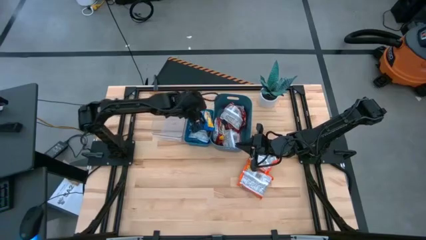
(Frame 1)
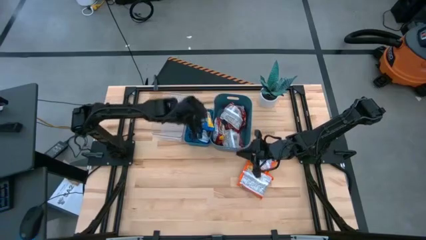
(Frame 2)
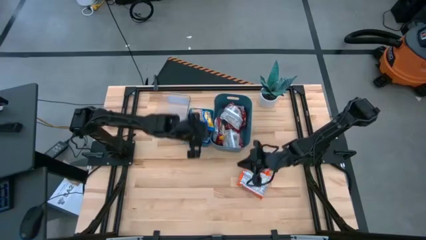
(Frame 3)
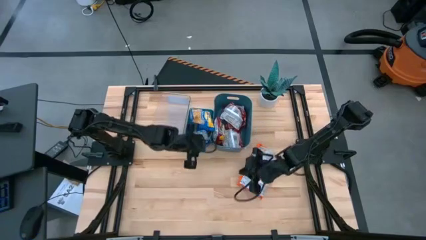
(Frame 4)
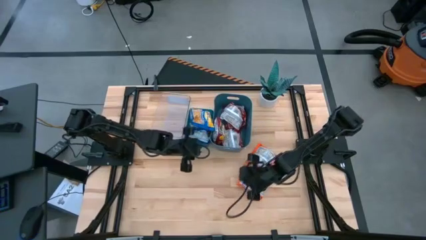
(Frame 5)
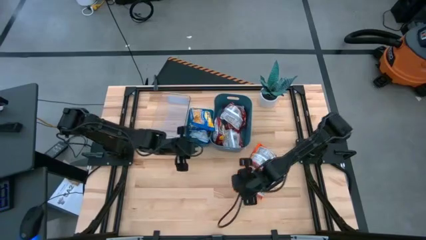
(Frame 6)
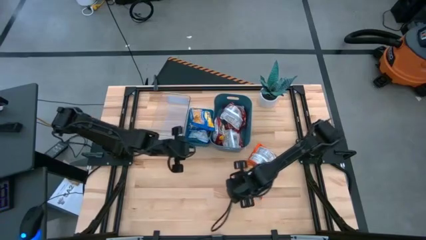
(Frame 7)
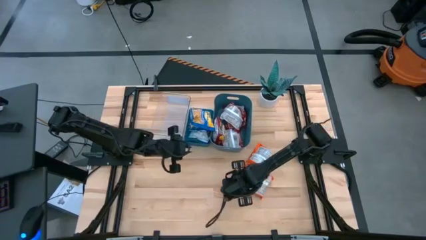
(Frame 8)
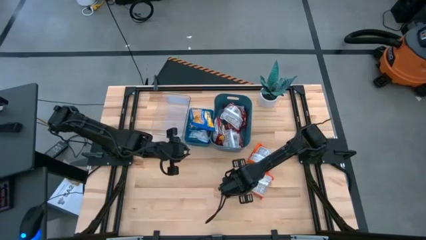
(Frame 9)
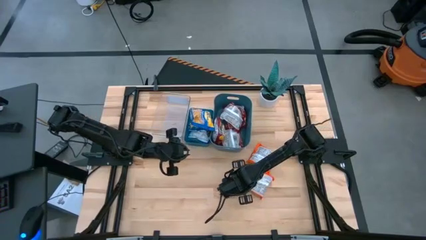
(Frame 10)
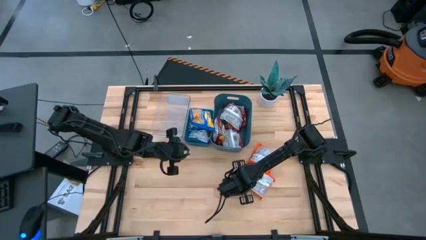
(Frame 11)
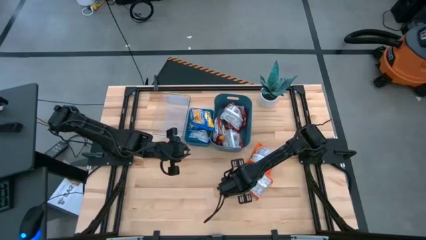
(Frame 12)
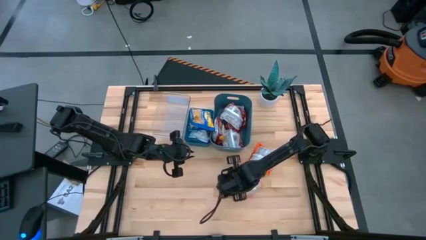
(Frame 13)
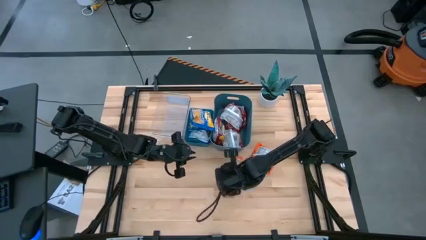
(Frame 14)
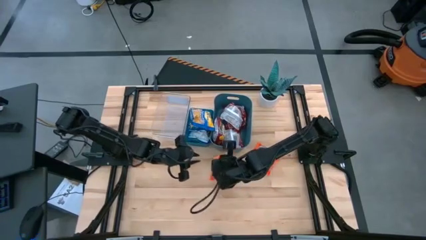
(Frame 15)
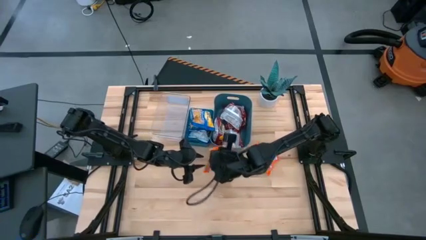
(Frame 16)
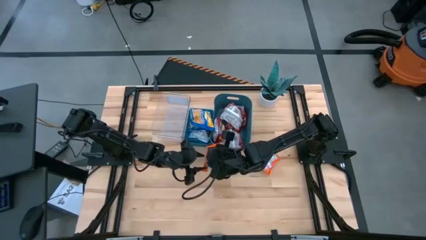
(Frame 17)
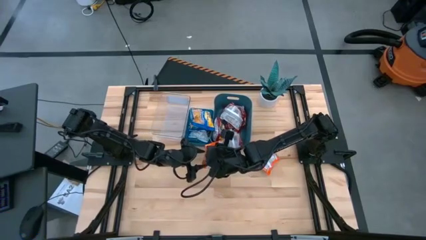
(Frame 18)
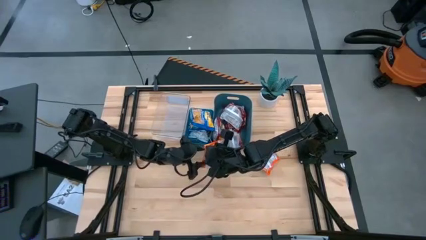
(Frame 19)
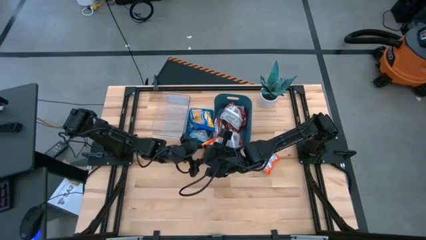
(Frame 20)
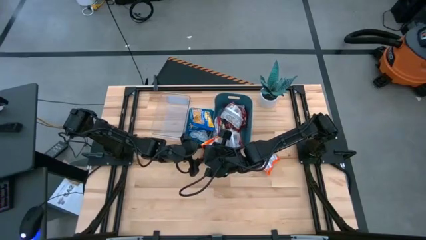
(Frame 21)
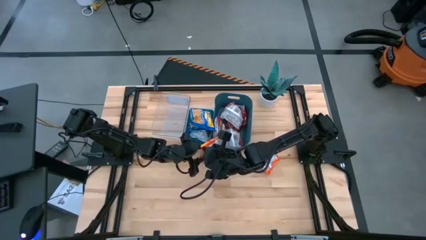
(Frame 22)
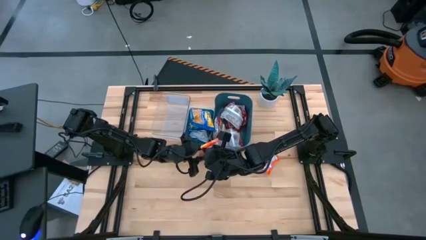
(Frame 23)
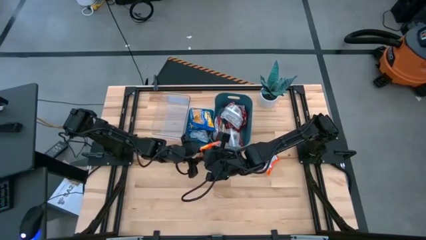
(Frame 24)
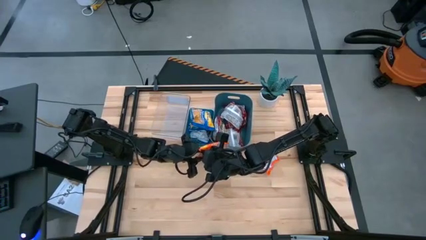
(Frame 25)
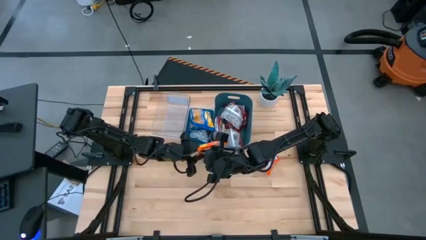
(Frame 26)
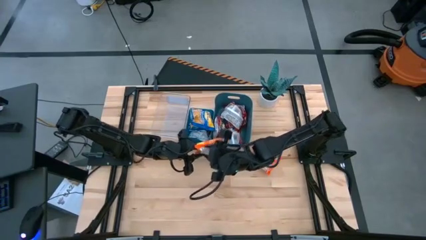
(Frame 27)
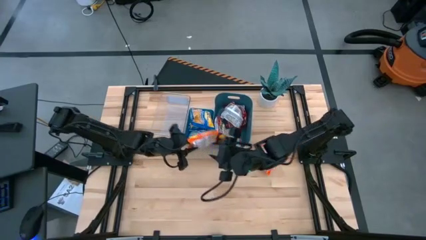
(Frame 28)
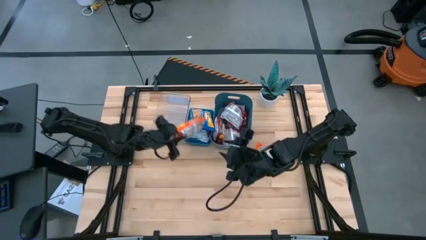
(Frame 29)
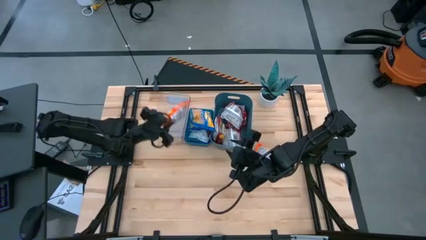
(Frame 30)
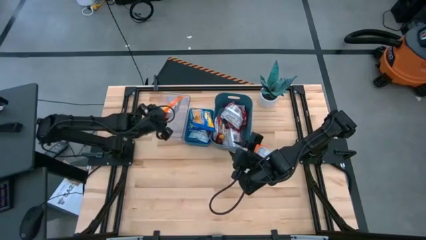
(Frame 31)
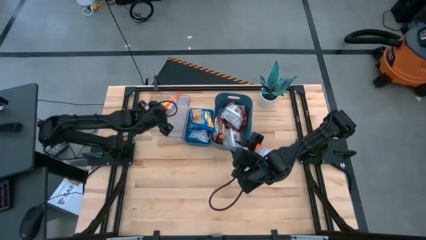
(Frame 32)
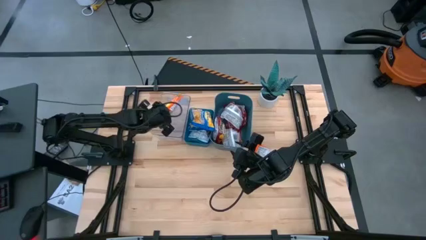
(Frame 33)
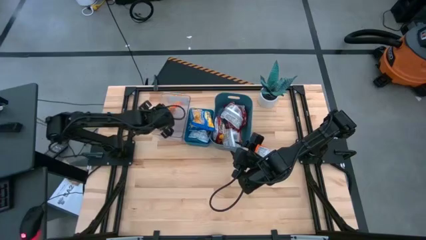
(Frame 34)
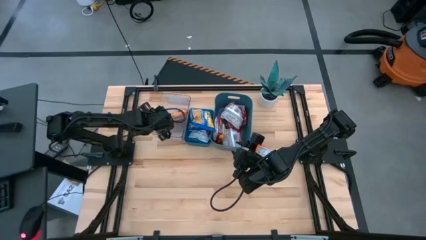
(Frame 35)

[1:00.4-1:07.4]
Task: Sort Maruchan noodles
Put the orange noodle pack into the transparent bin

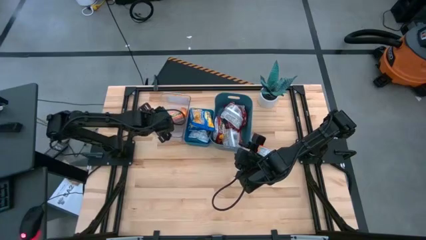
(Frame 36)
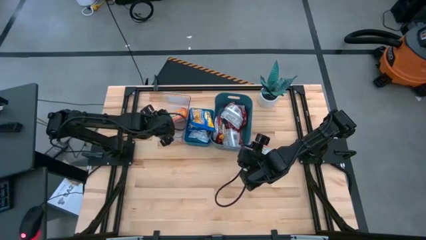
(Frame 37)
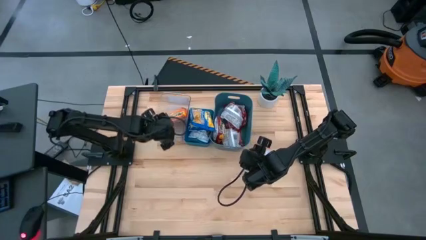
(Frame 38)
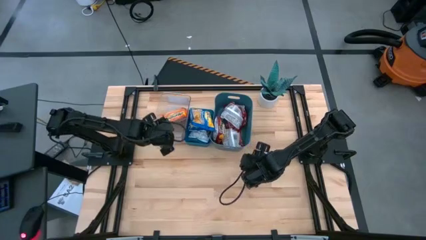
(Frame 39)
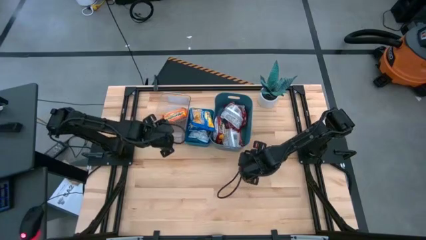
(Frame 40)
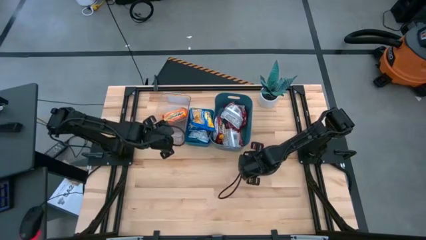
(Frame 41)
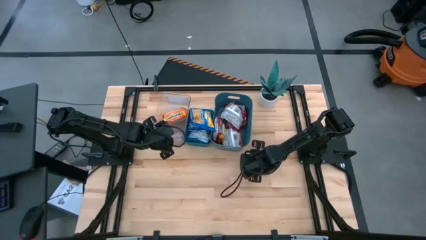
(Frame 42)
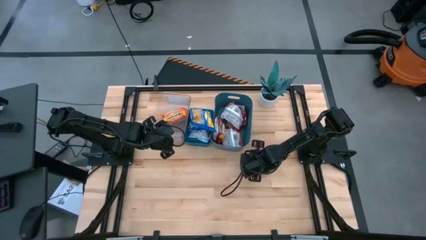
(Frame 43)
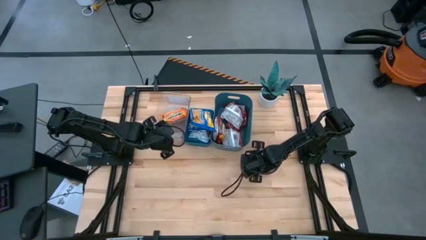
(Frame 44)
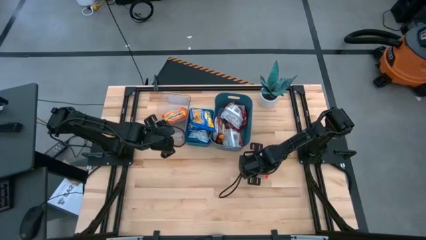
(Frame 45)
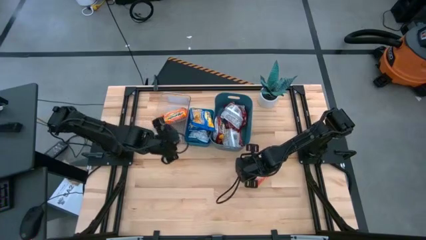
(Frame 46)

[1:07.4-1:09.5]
Put the orange noodle pack into the transparent bin

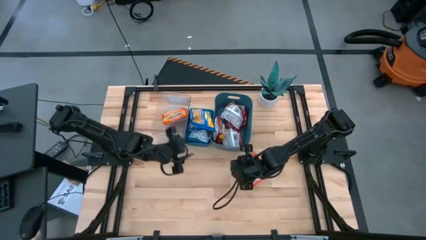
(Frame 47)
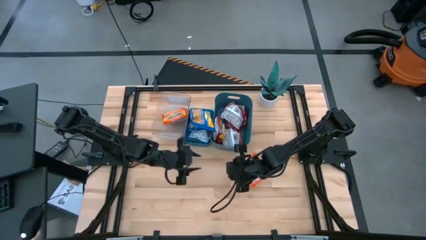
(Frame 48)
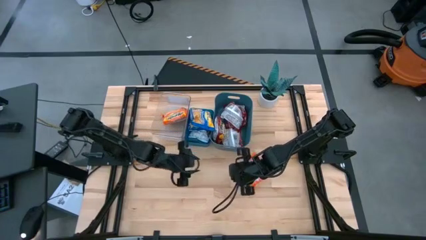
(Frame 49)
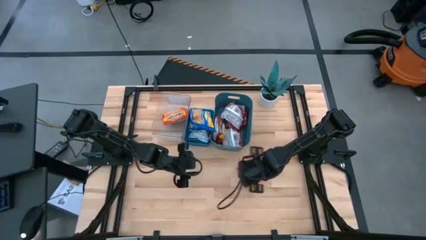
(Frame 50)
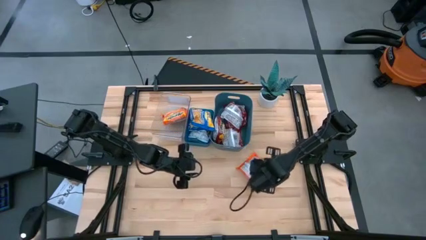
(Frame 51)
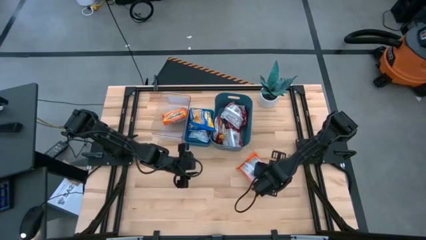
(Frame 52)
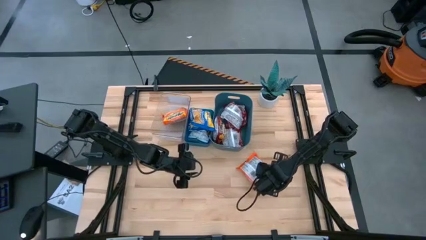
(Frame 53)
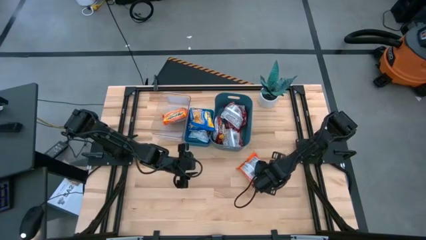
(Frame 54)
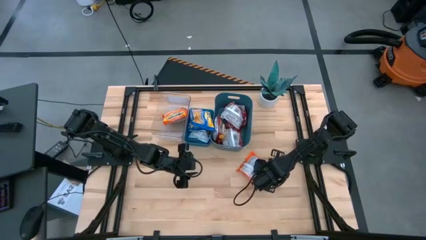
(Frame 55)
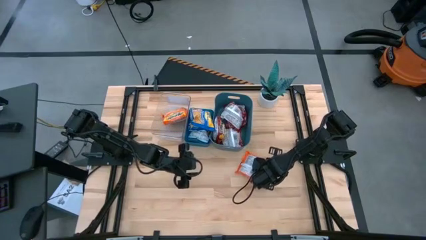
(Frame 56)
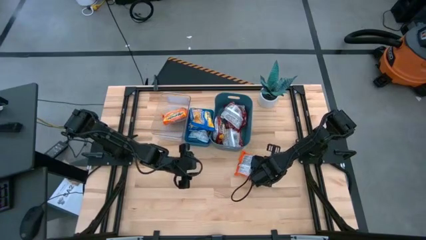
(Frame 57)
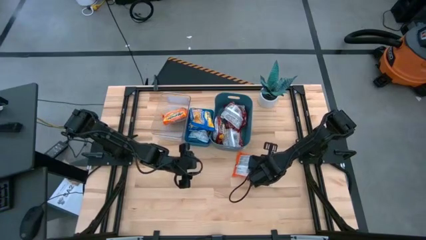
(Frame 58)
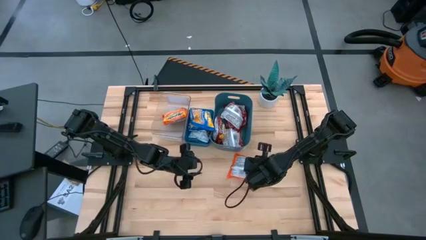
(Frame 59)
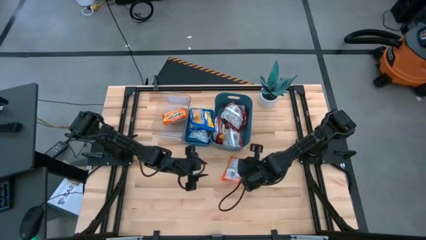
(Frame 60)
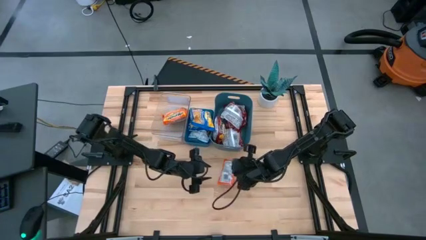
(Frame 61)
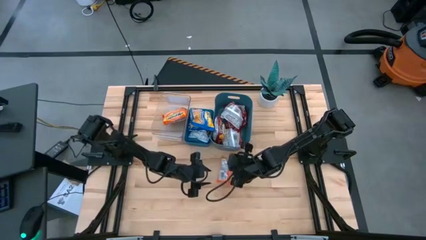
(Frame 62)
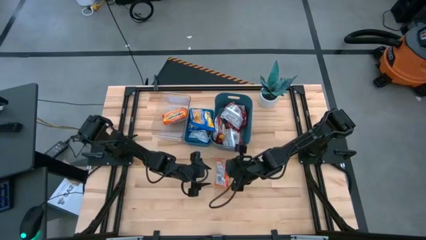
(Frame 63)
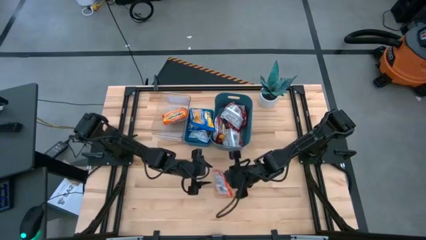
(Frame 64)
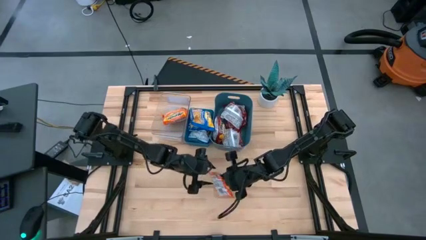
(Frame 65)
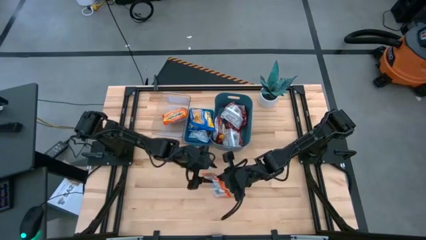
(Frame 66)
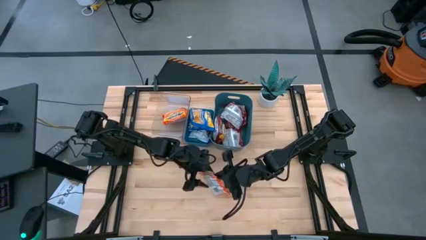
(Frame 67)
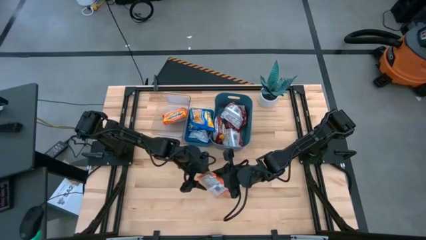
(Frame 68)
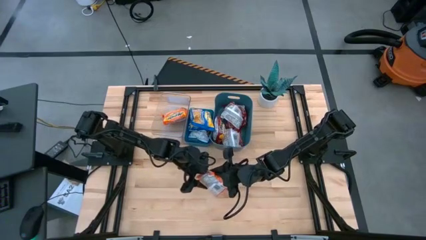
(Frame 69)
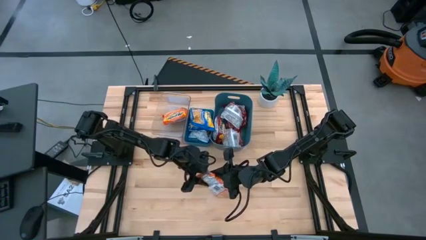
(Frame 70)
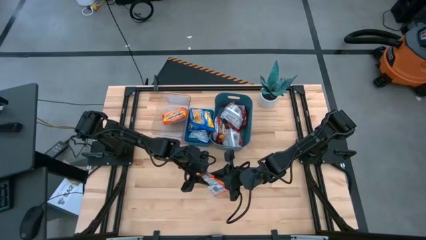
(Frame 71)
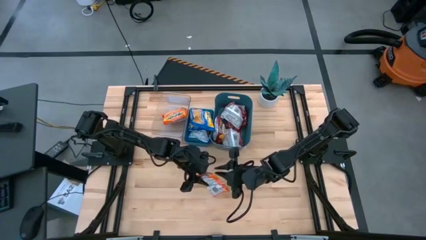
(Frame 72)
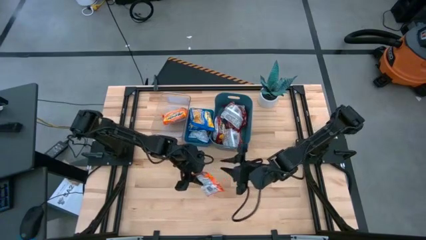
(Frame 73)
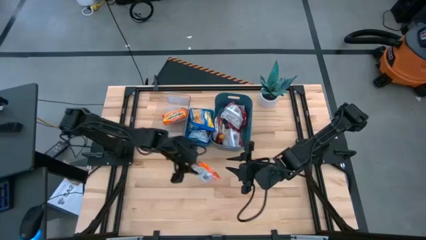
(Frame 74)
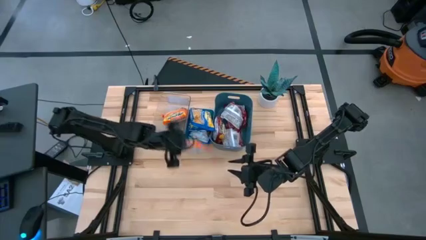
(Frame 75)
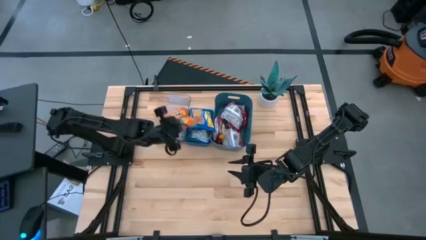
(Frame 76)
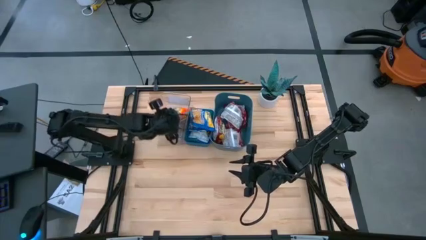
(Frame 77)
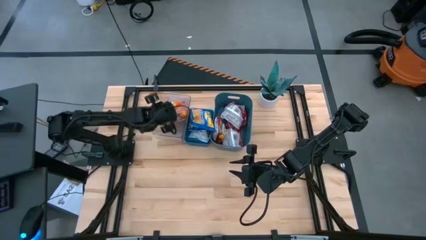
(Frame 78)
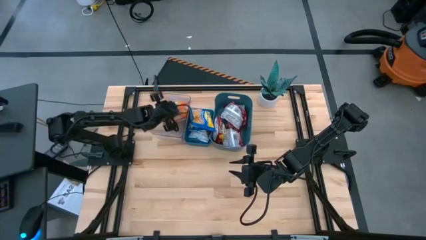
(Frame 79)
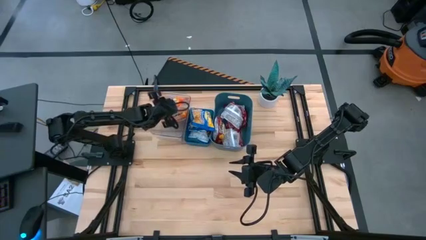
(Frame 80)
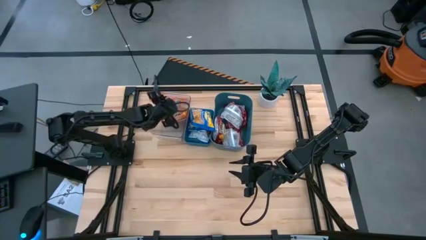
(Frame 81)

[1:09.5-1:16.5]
Put the orange noodle pack into the transparent bin
